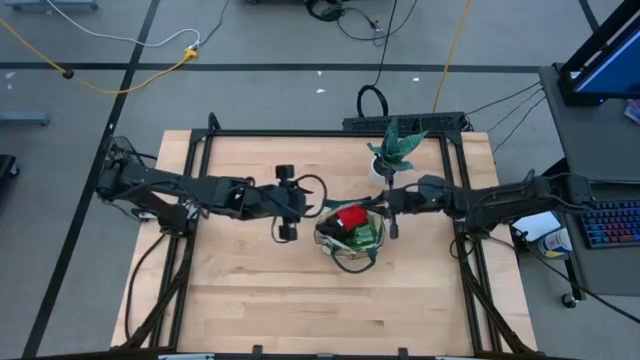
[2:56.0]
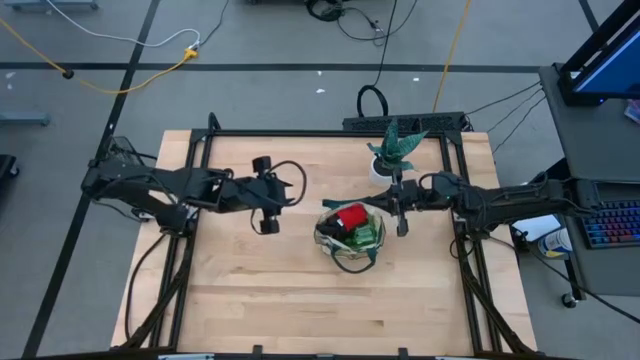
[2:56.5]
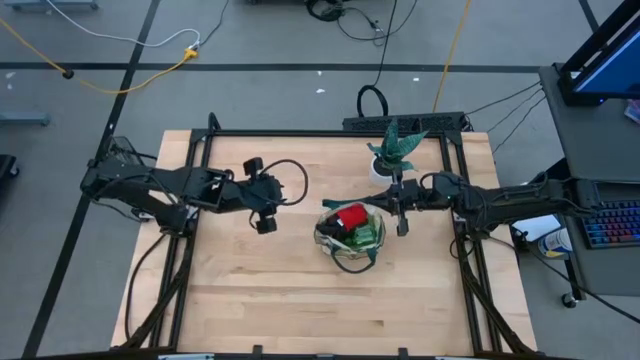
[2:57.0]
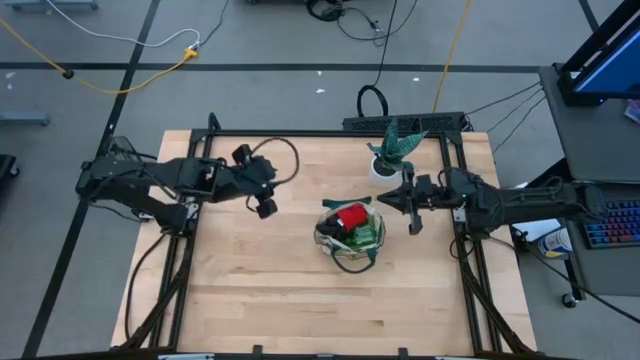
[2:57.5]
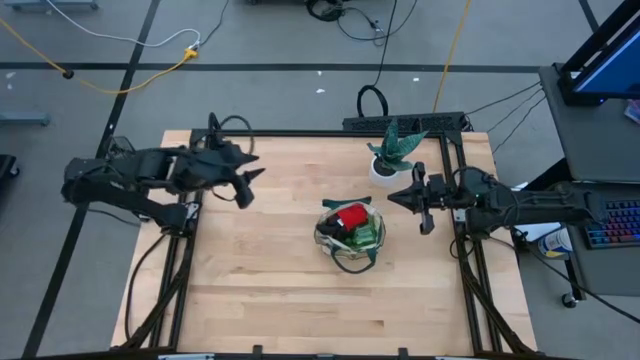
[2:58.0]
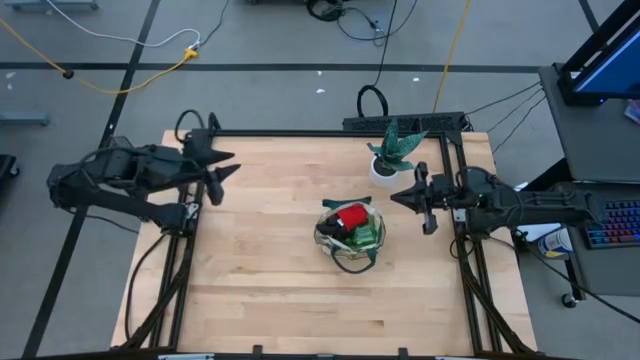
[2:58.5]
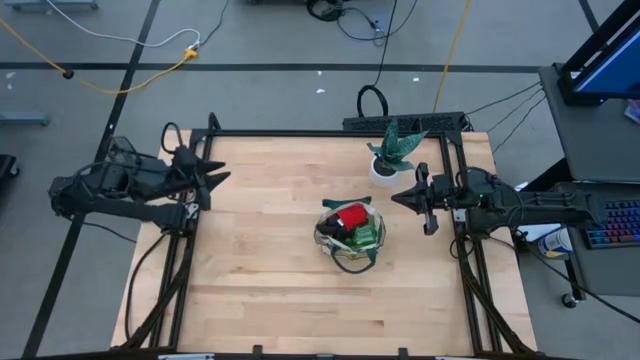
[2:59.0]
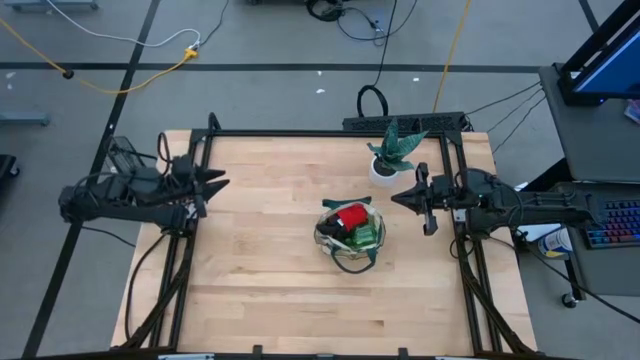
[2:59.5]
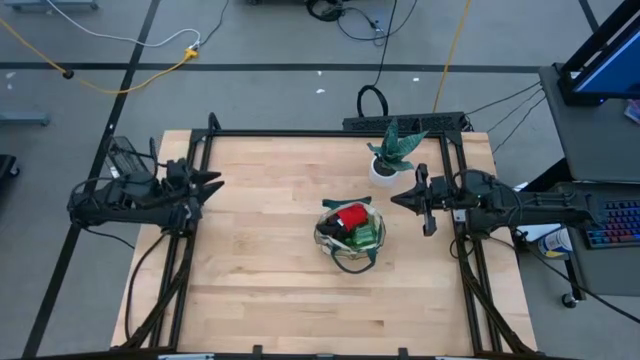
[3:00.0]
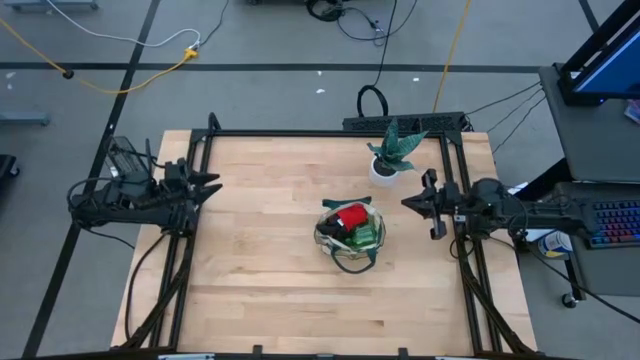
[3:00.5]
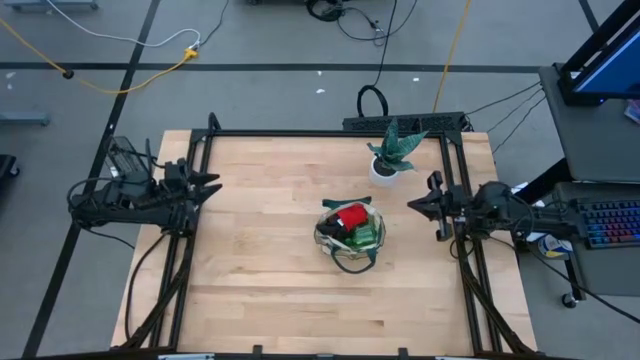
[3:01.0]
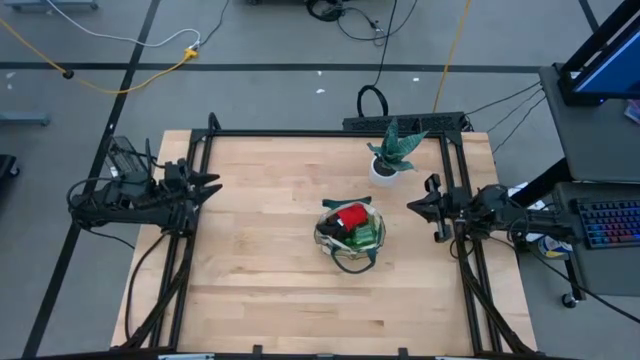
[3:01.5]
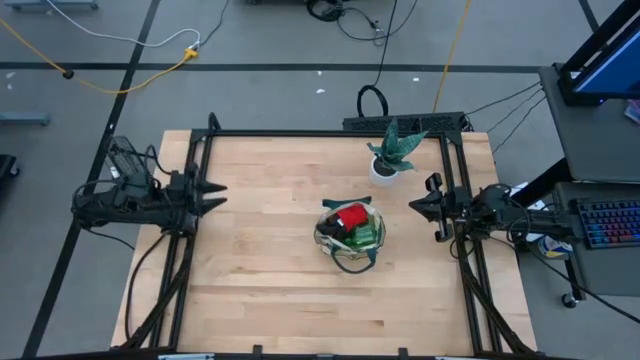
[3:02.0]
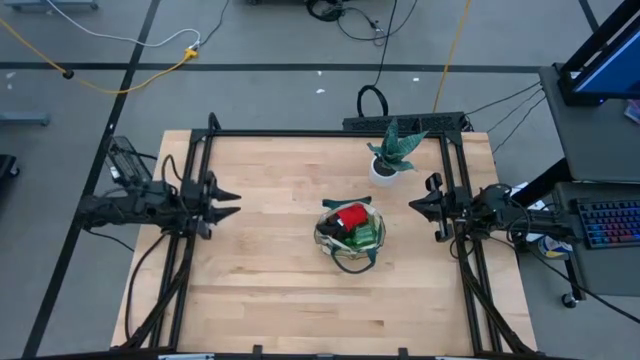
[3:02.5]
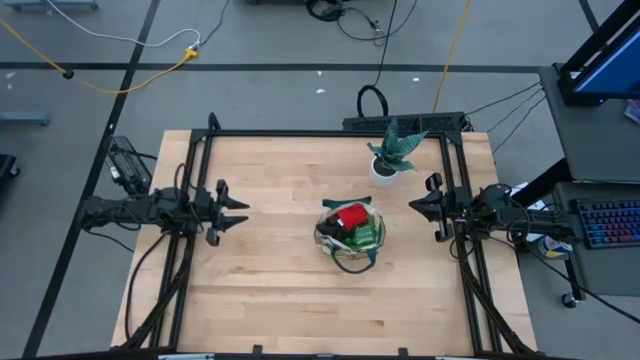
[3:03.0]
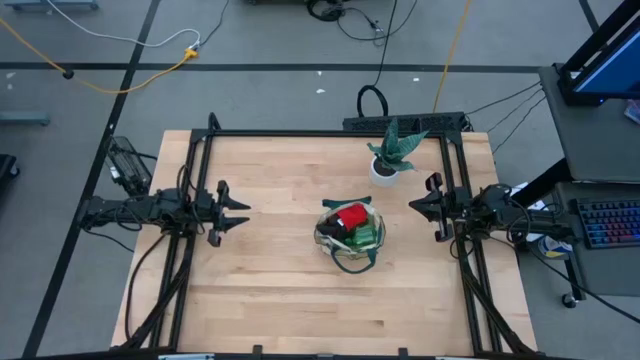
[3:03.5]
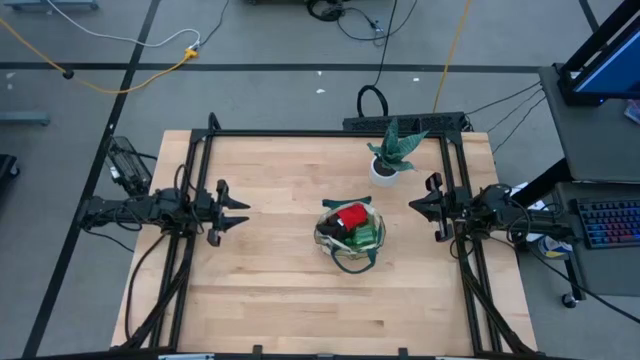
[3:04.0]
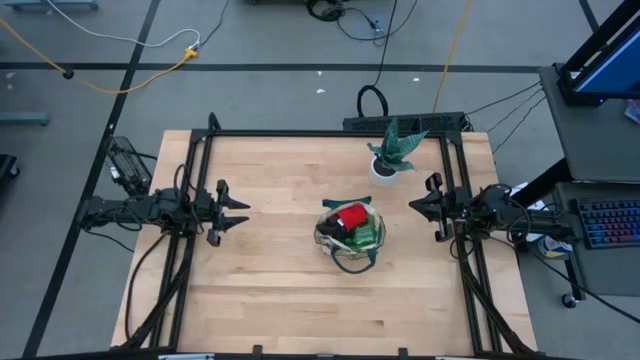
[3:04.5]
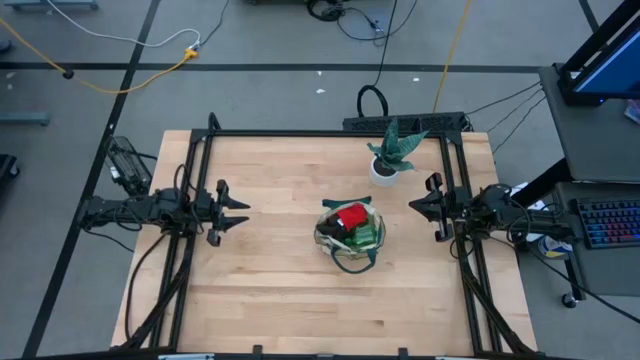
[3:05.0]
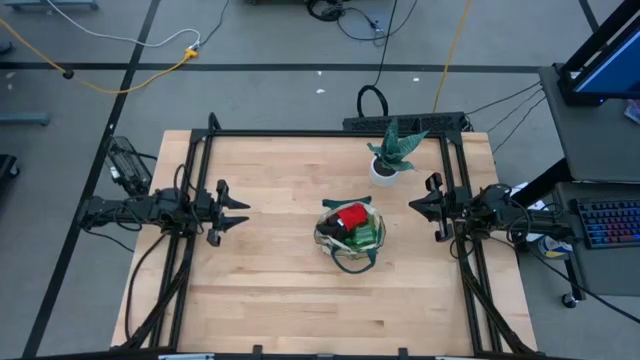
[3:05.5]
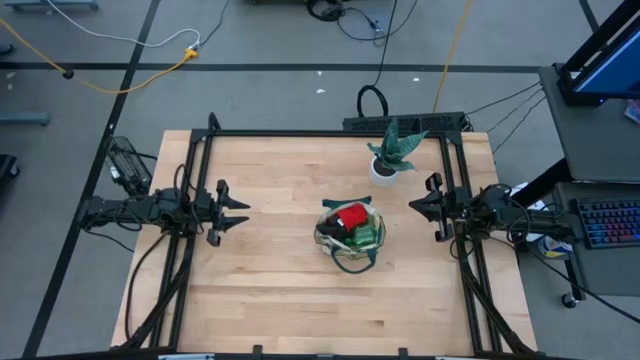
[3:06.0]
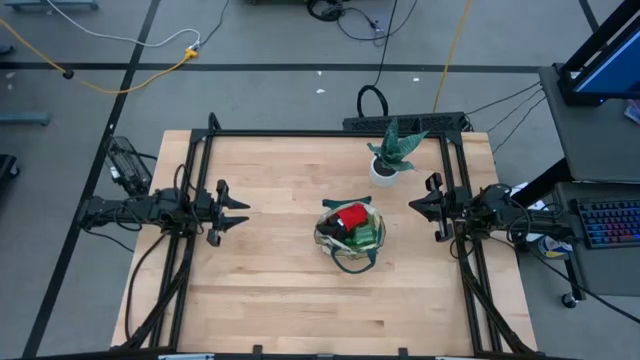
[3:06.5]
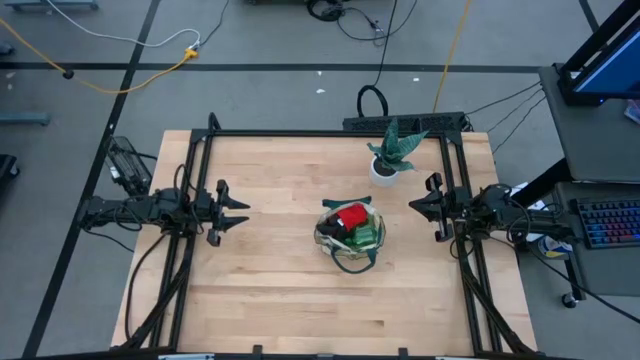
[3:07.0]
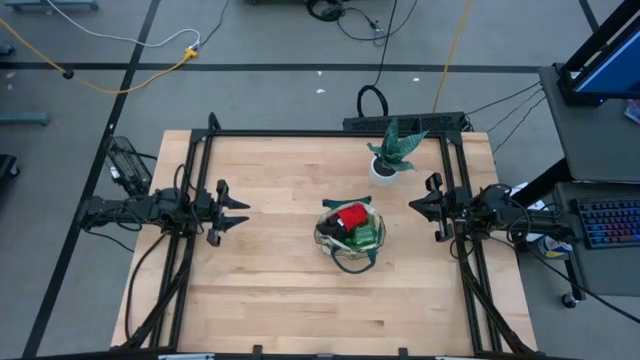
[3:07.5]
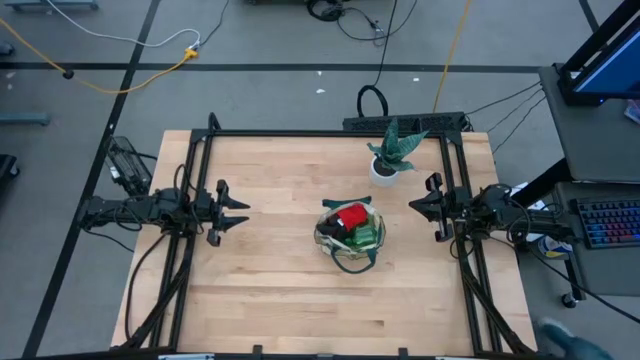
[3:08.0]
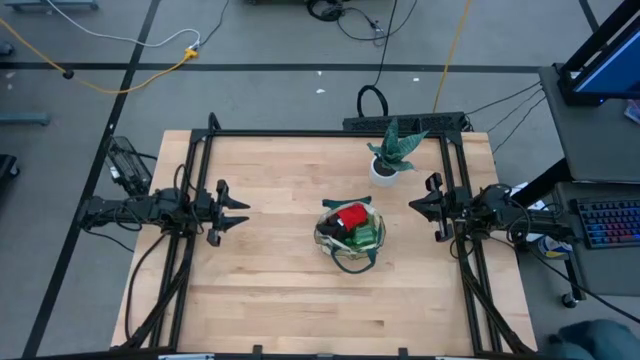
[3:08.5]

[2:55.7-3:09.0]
Task: Pick & Place Garden tools in Gardening bag
Return to Home Position

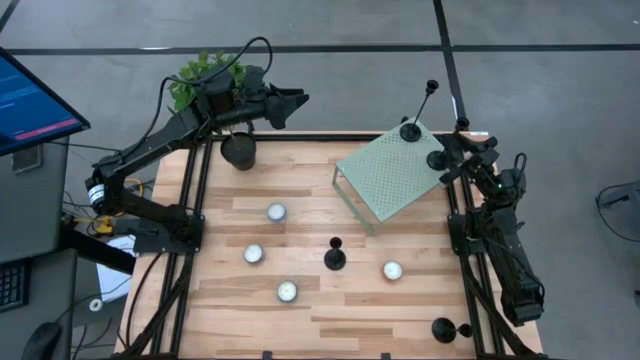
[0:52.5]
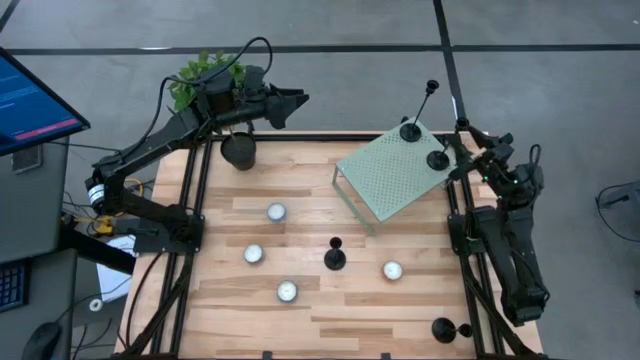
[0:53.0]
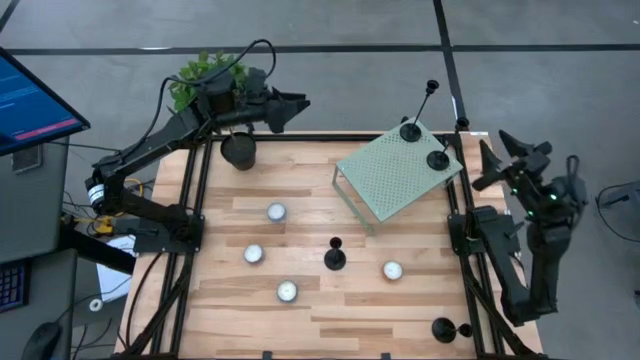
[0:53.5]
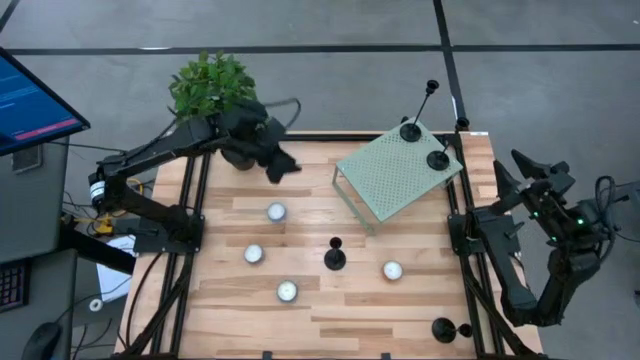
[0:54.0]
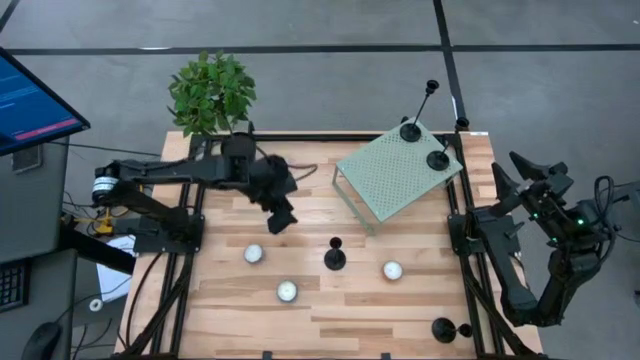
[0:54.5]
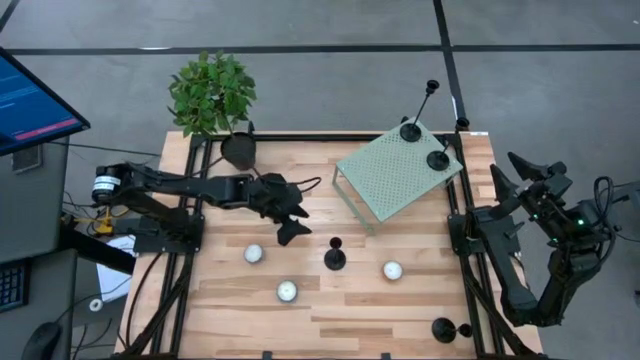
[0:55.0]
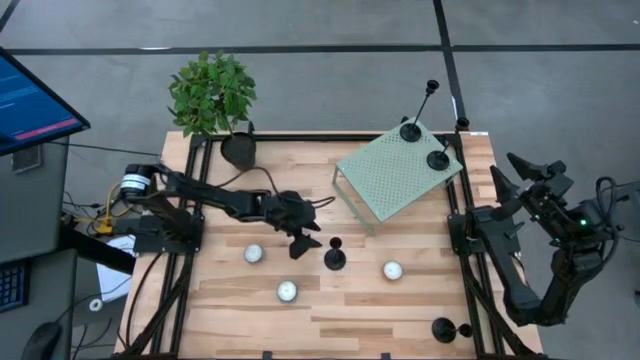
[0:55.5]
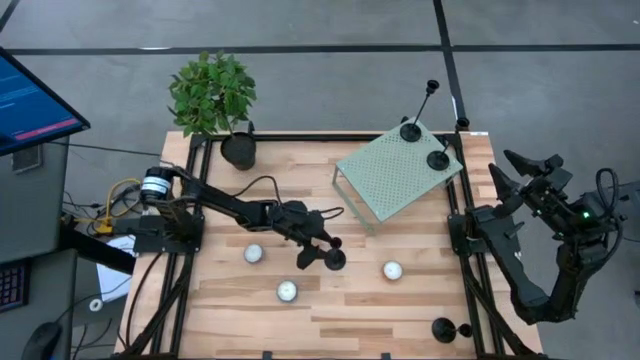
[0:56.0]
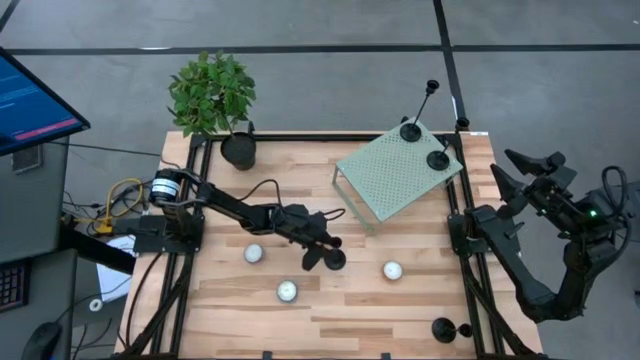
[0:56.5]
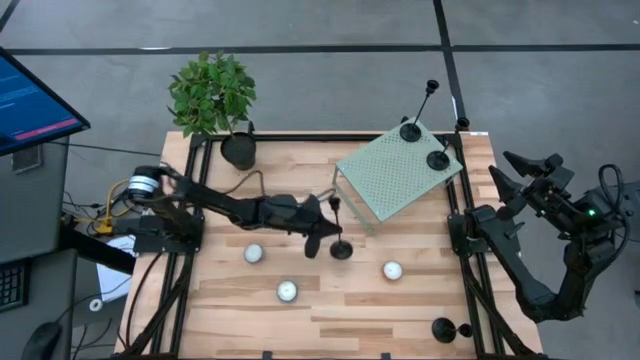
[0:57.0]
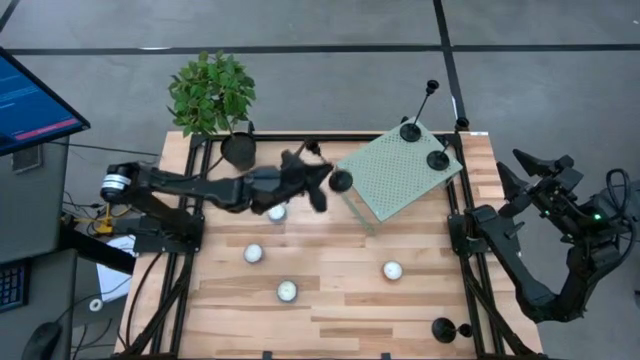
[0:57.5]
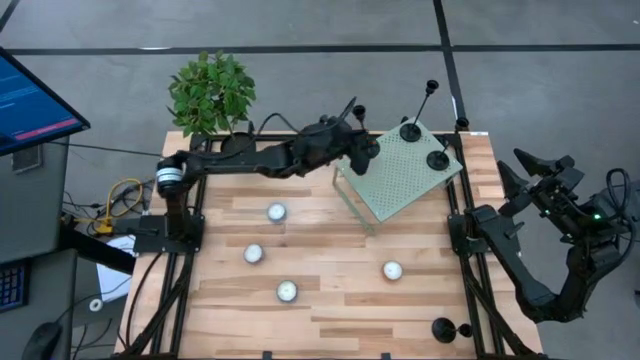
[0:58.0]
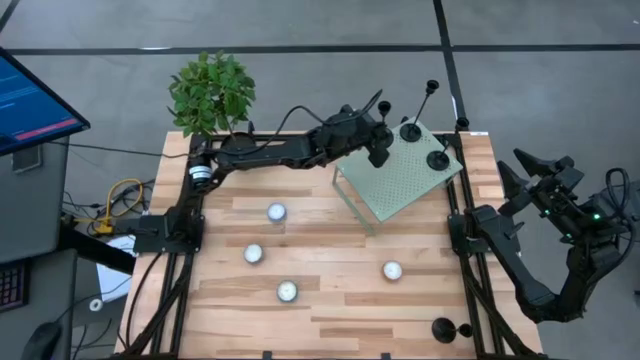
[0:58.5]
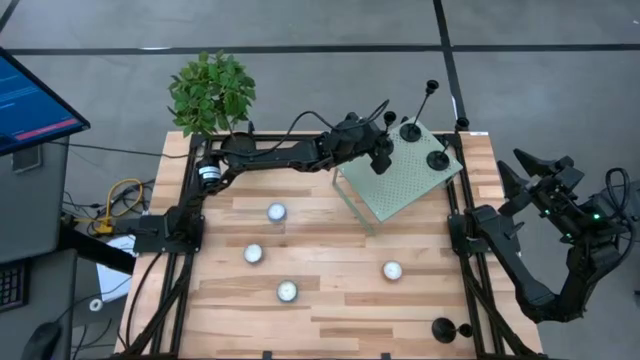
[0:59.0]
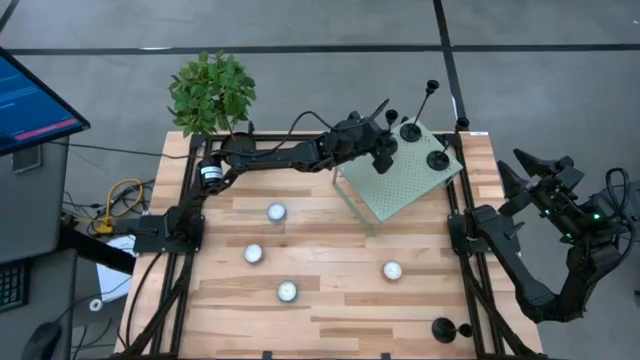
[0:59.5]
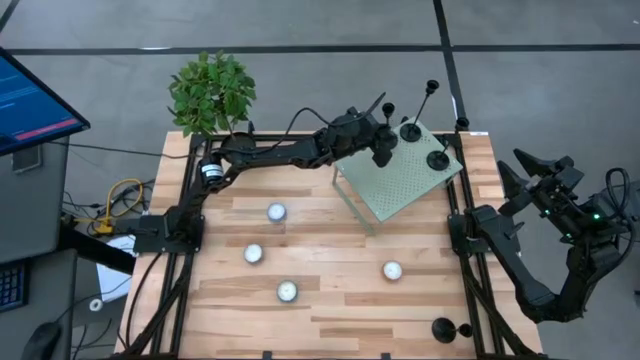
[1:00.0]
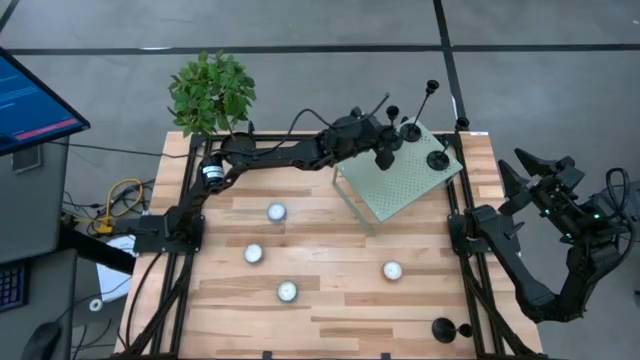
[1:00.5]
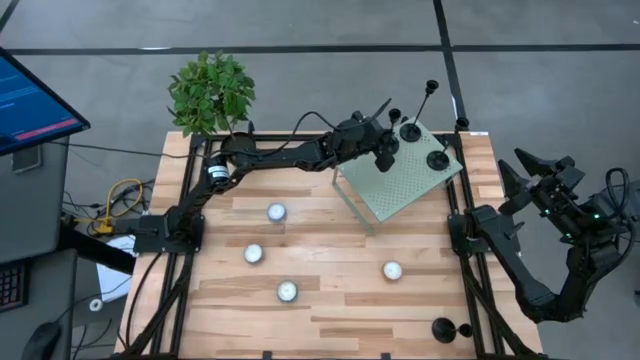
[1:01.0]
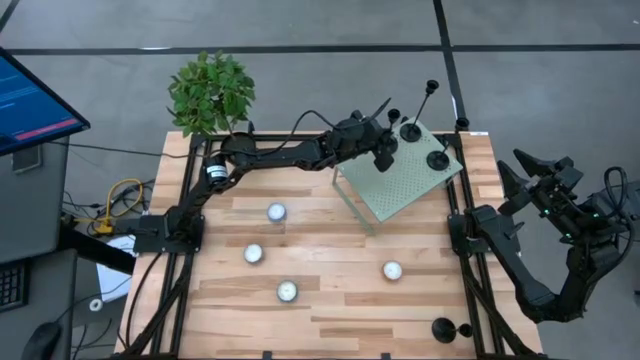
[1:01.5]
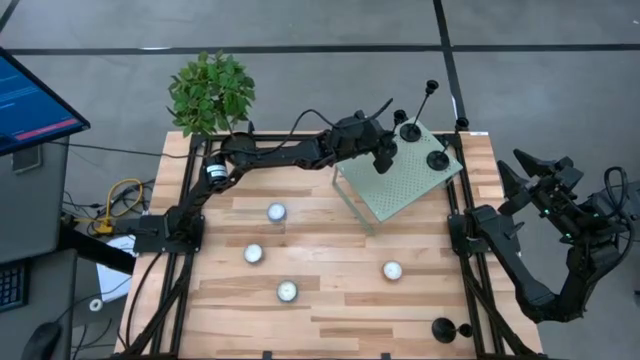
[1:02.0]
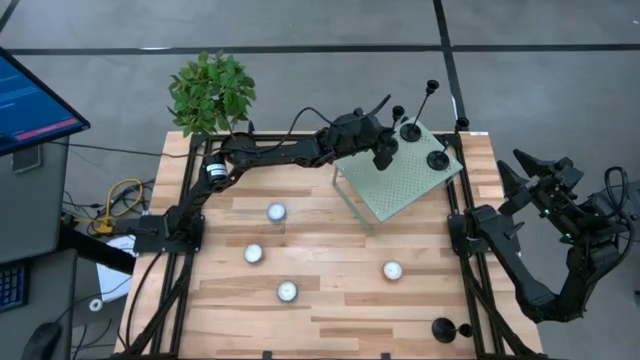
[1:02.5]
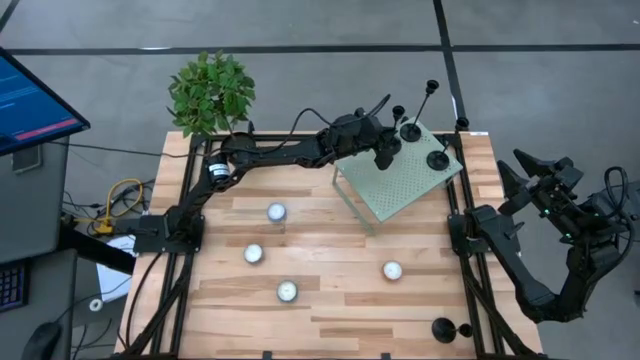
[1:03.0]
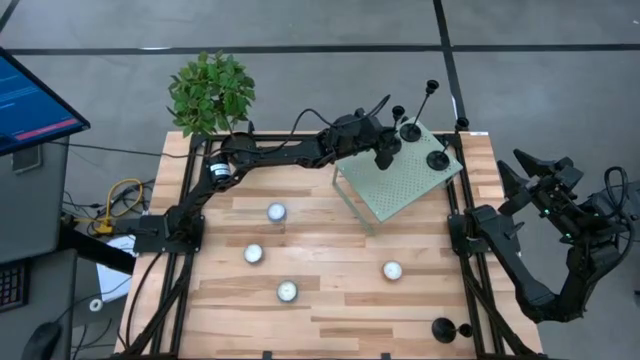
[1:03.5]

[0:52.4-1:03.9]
Task: Pick & Place candle stick holders
Put the black candle holder on the shelf
